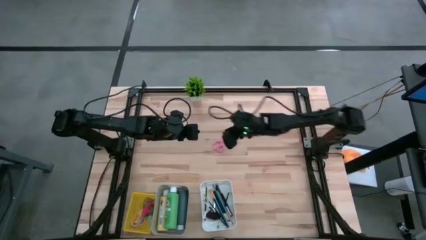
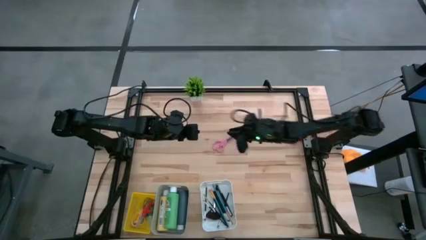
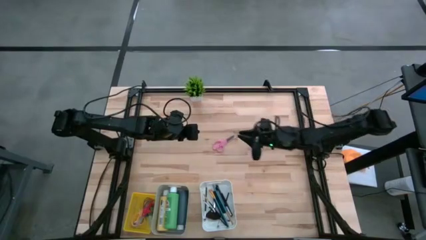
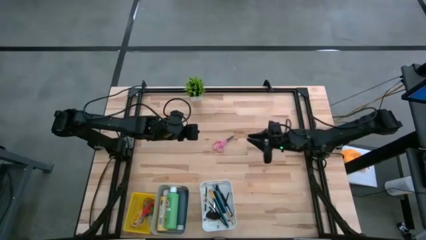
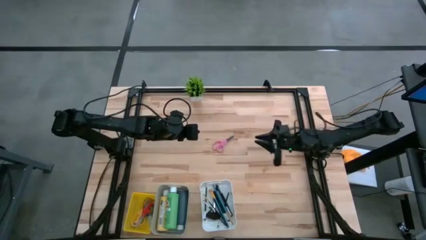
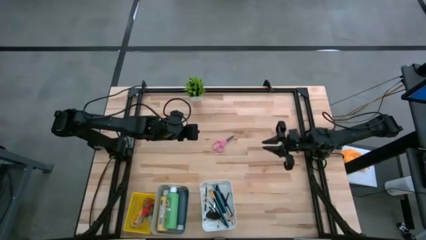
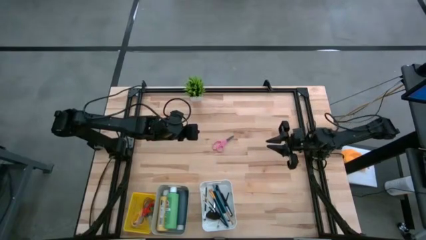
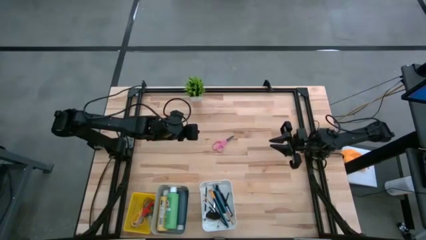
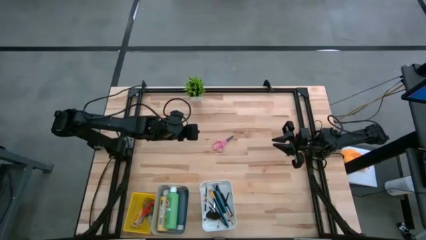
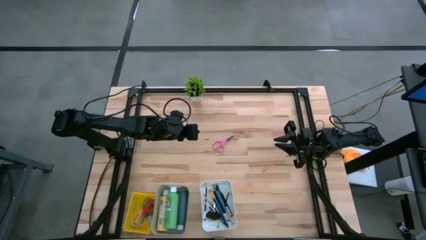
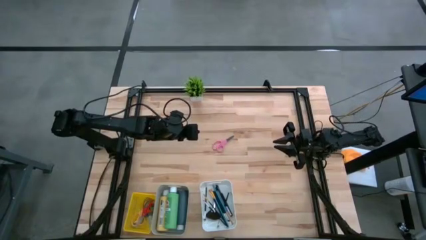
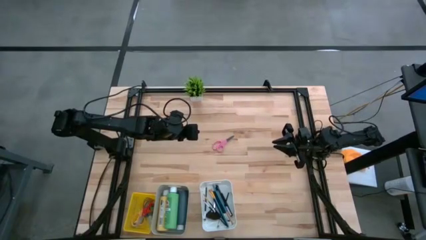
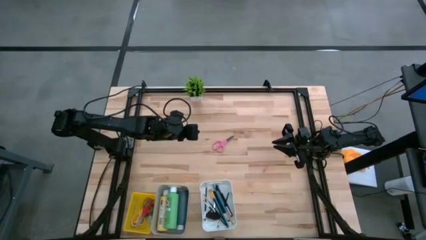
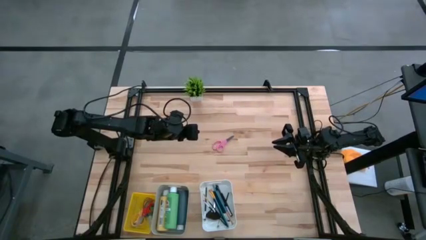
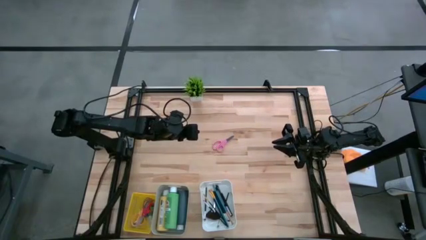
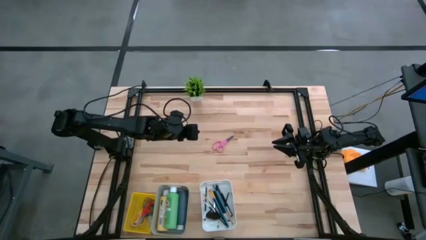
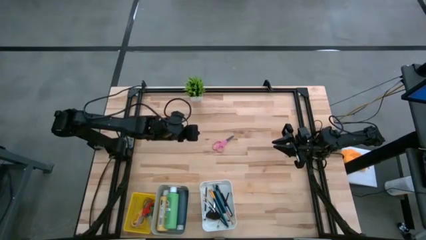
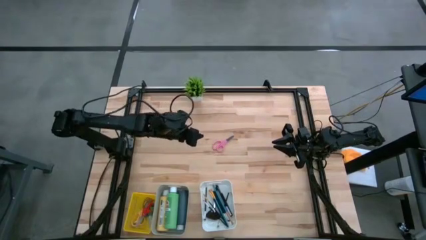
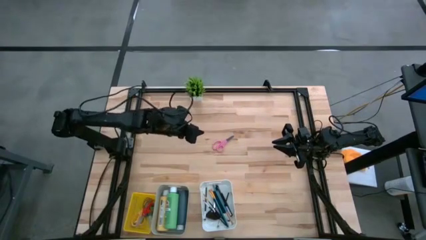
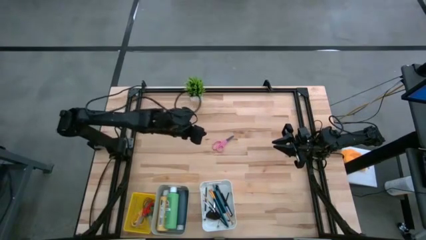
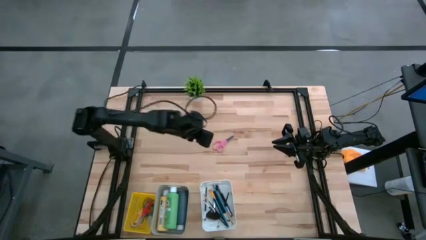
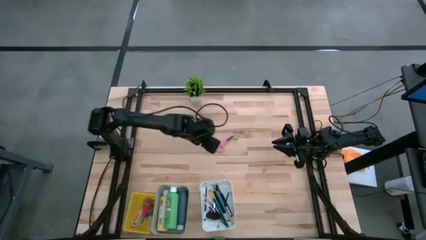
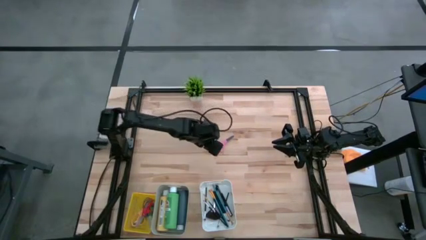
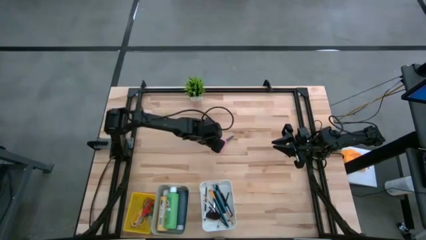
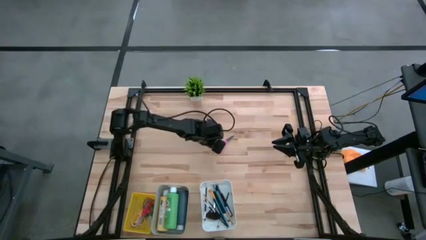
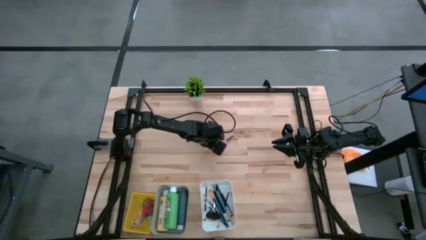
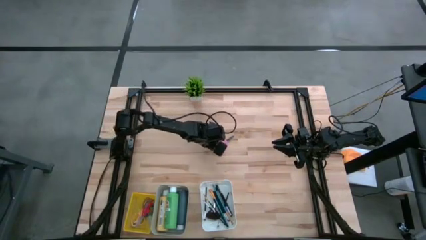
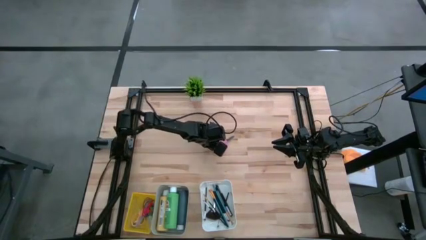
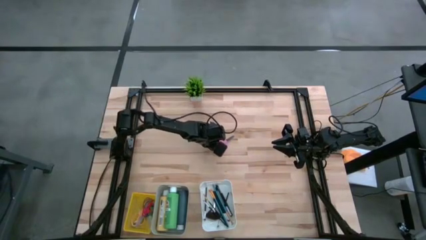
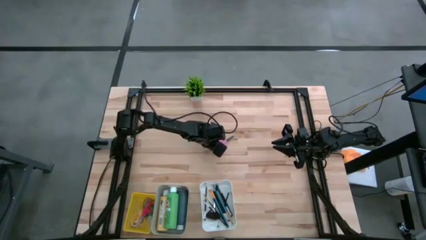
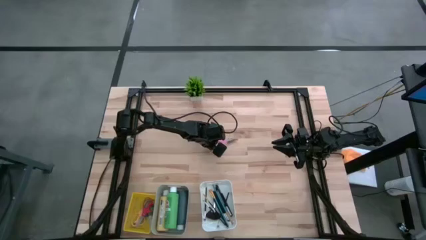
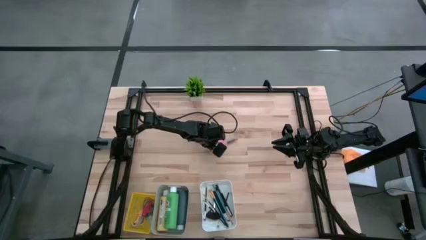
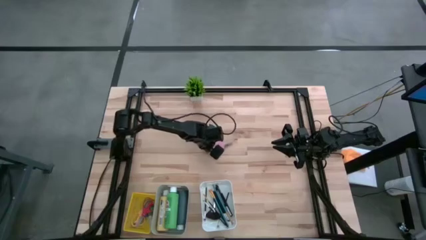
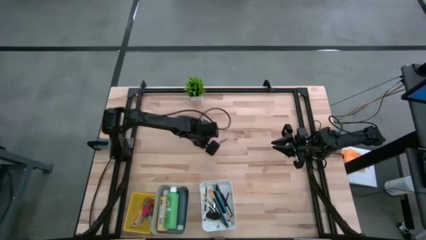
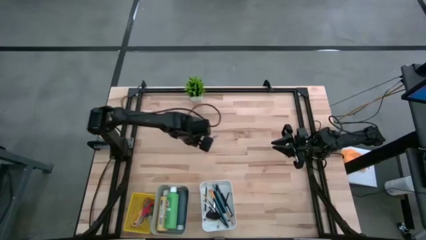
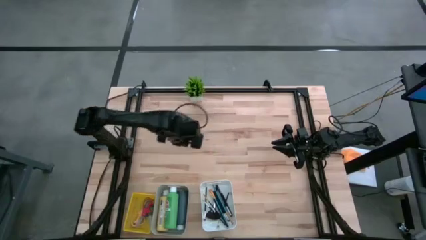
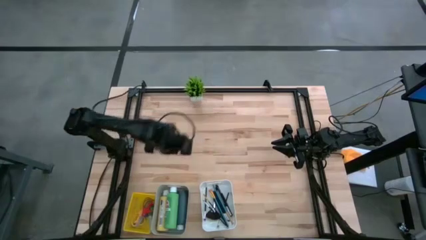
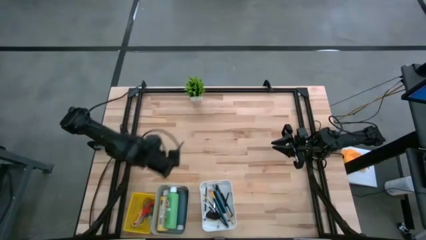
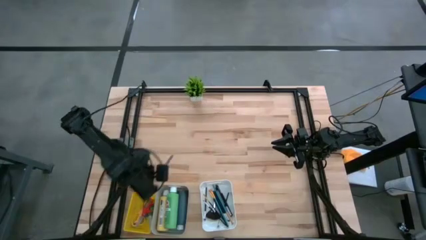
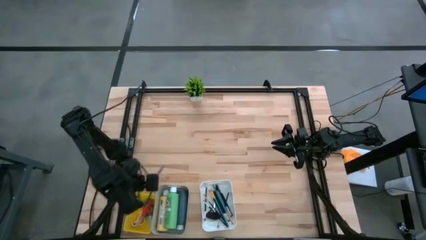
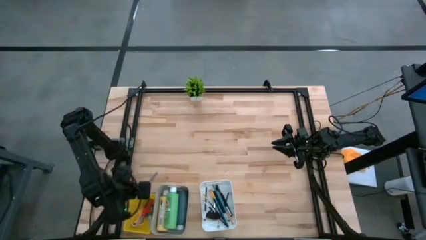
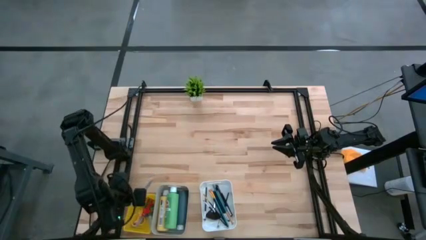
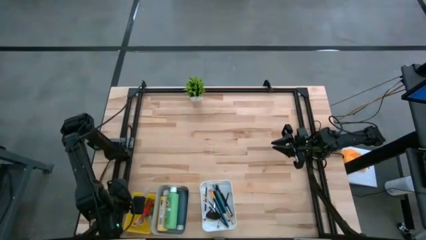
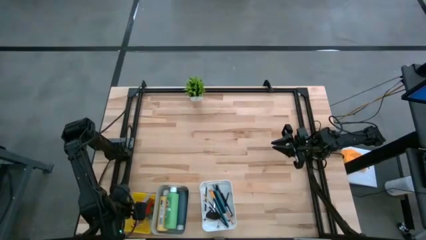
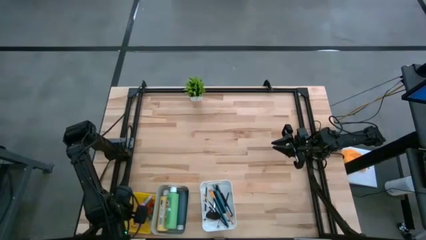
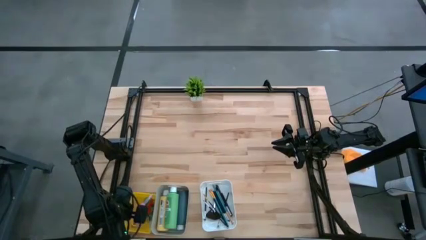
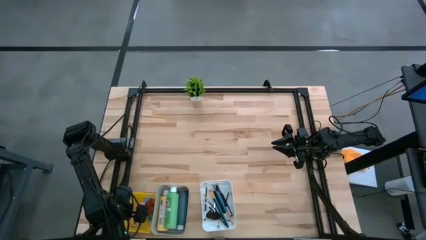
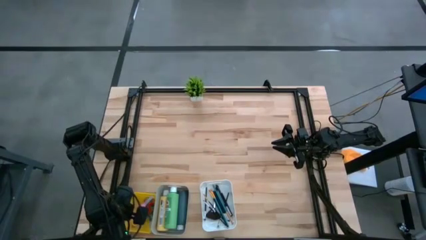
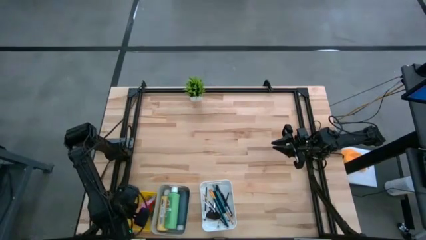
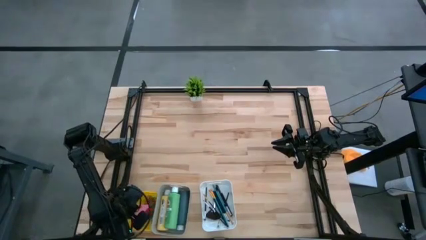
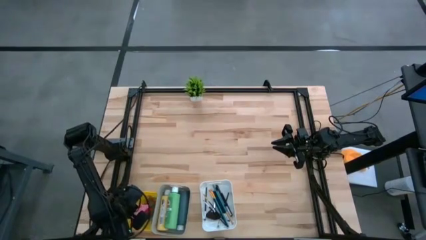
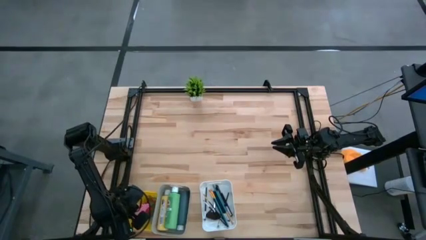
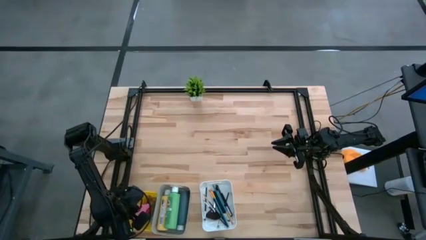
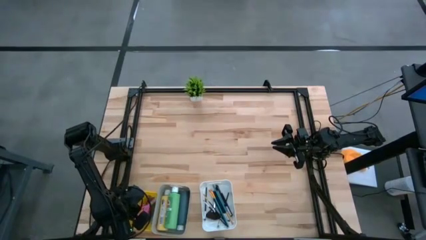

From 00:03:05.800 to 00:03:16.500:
Task: Pick & Place Paint Supplies
Put the pink scissors into the yellow bin

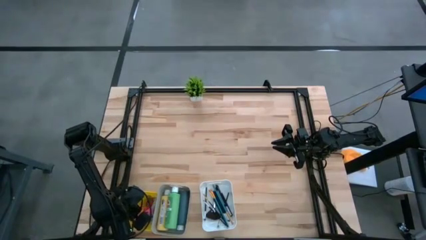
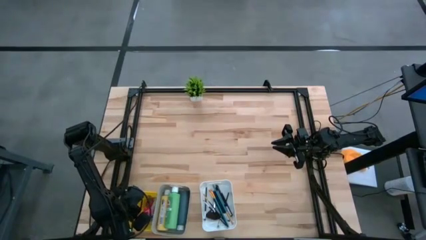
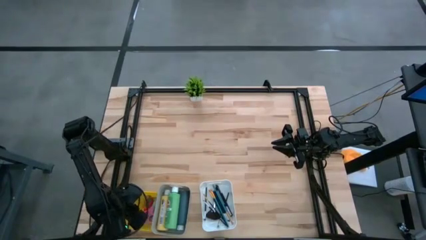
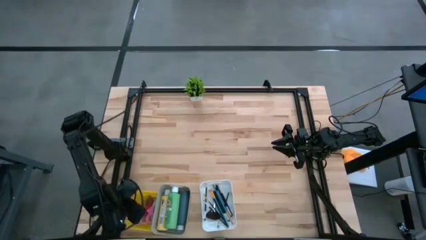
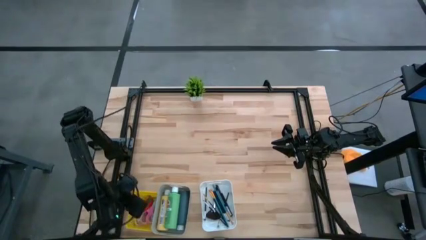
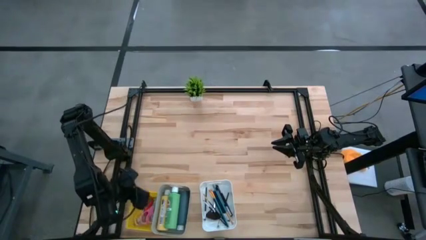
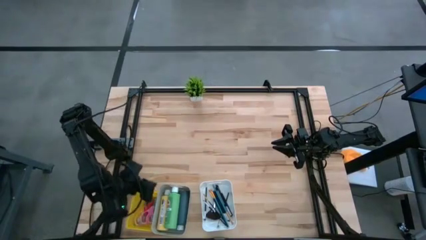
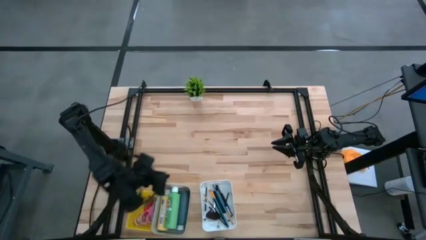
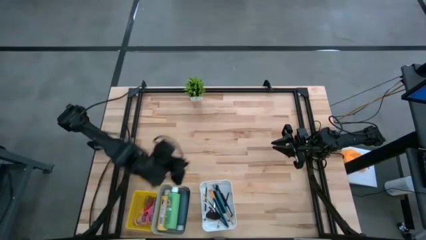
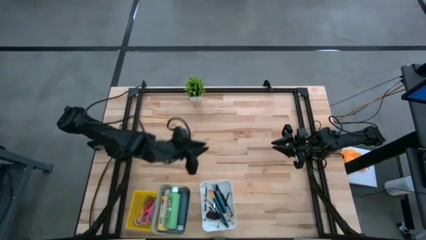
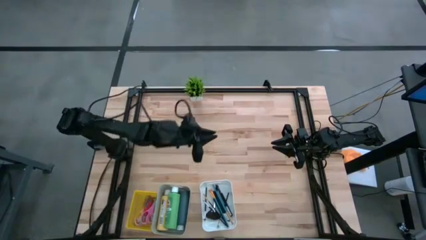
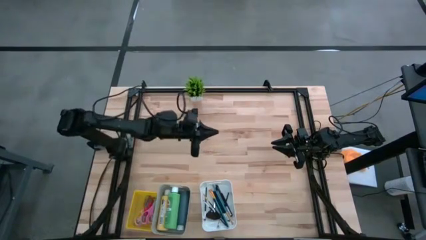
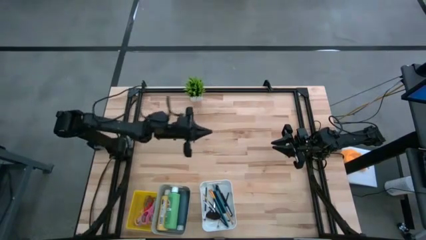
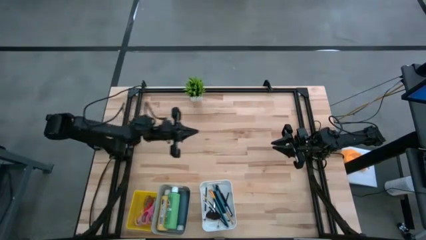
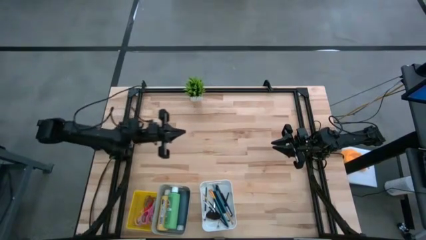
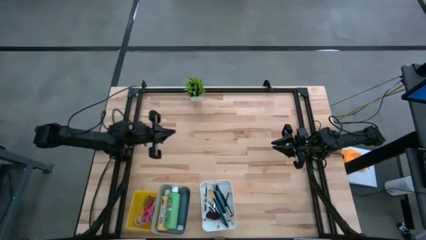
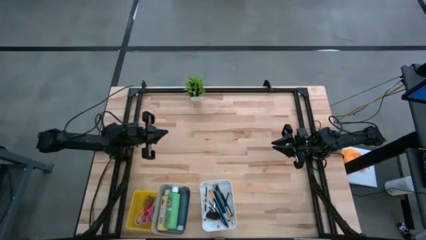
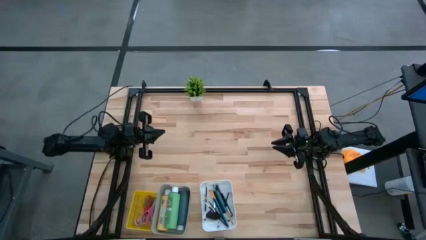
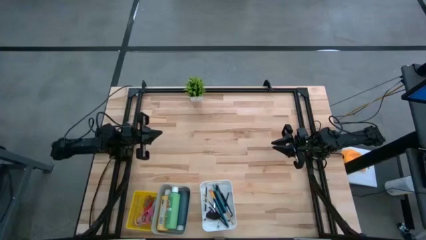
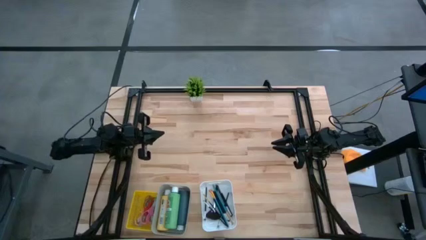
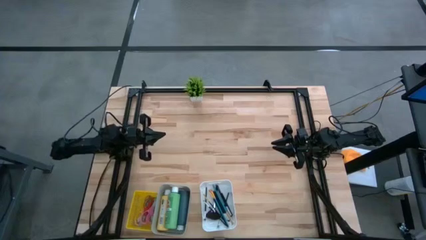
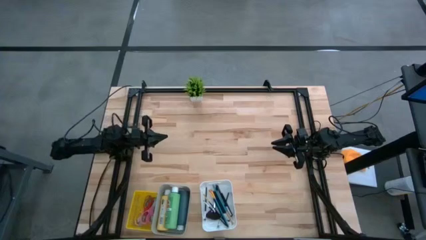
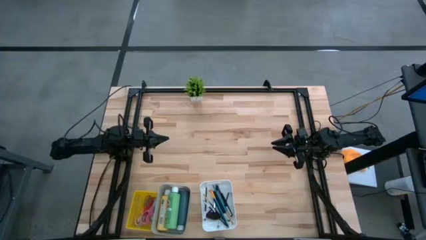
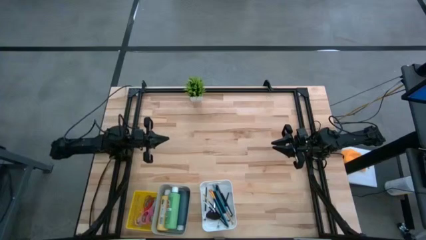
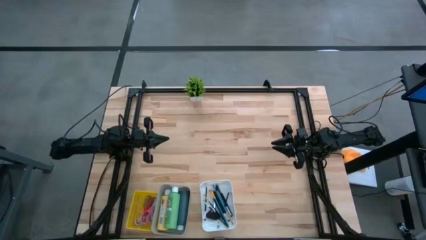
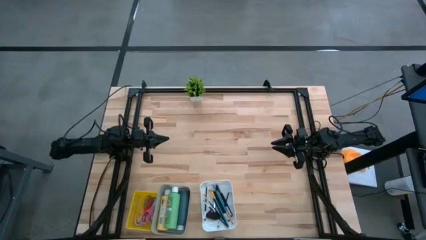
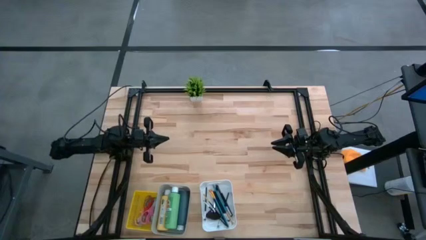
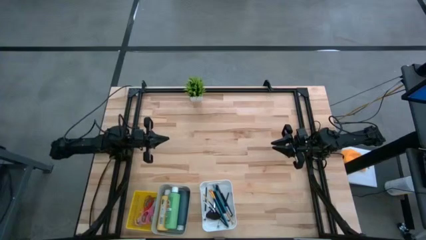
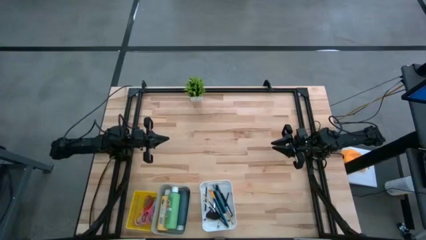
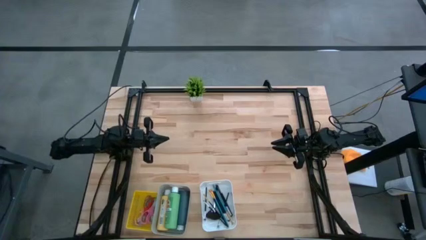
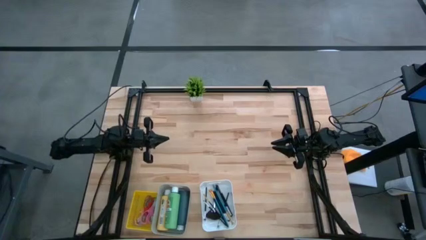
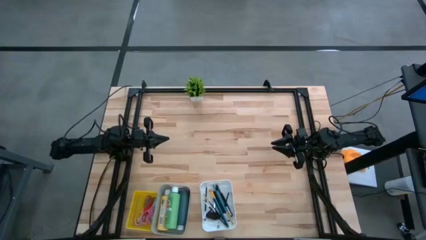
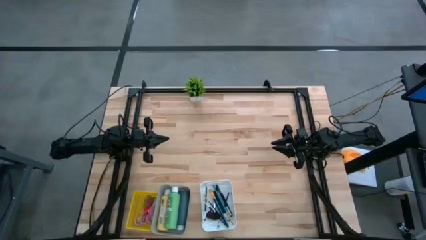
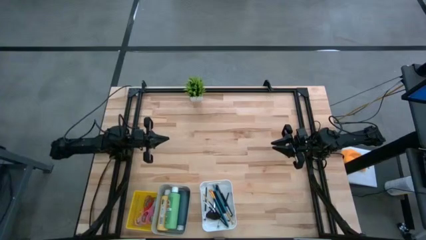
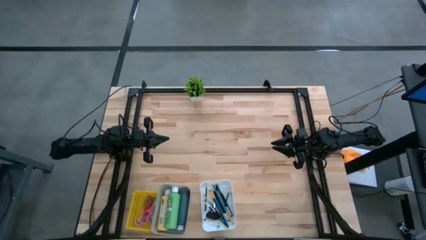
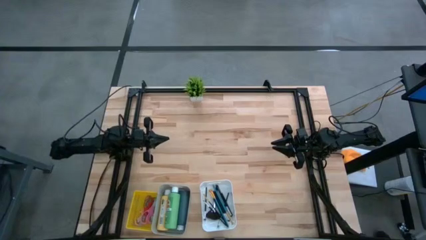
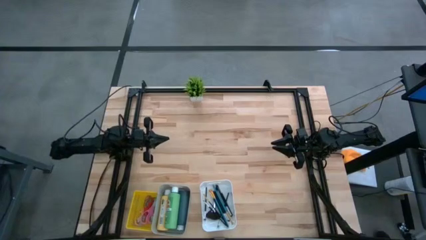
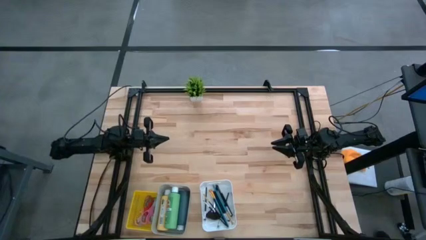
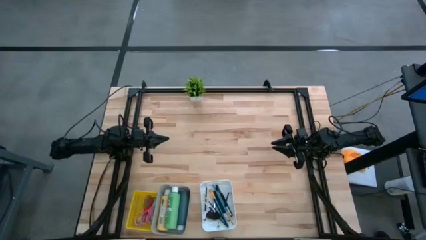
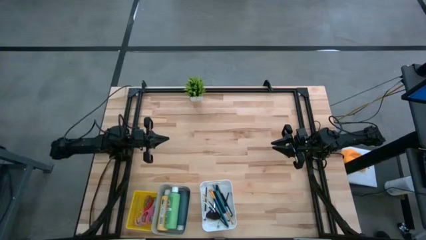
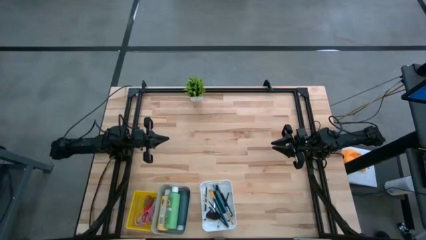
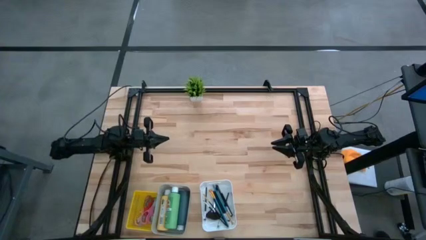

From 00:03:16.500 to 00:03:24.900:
Return to Home Position
